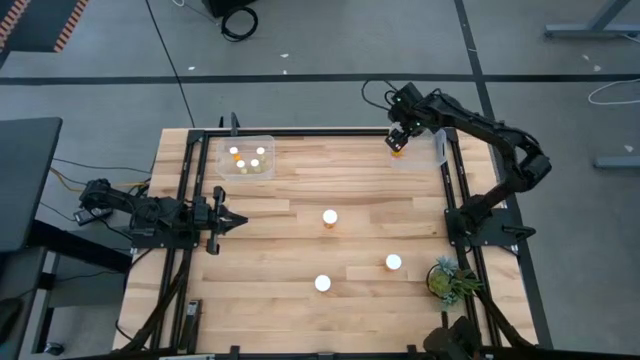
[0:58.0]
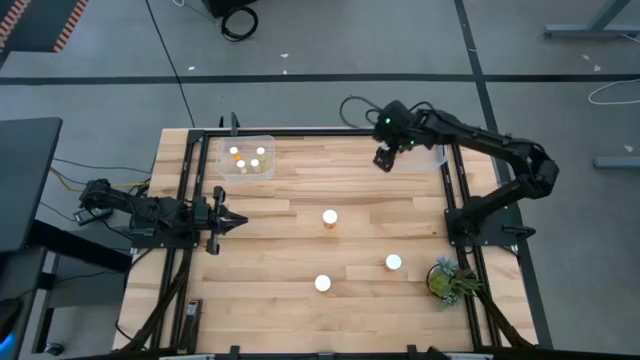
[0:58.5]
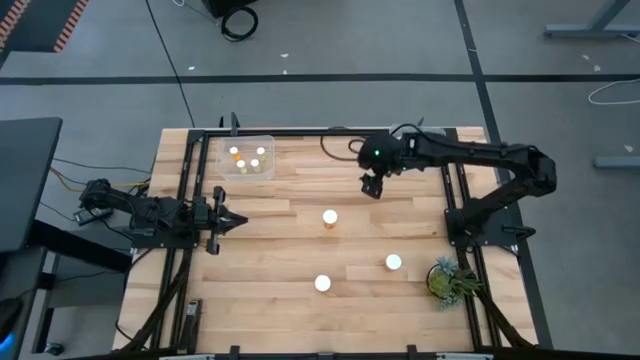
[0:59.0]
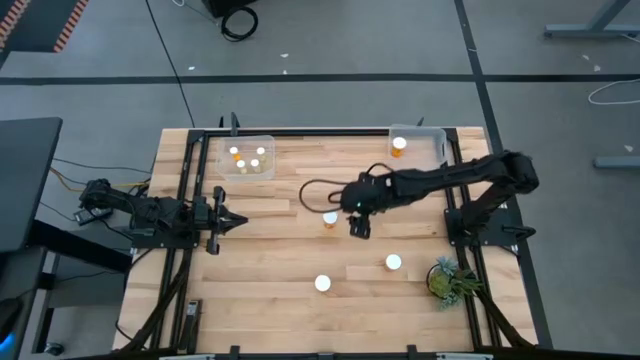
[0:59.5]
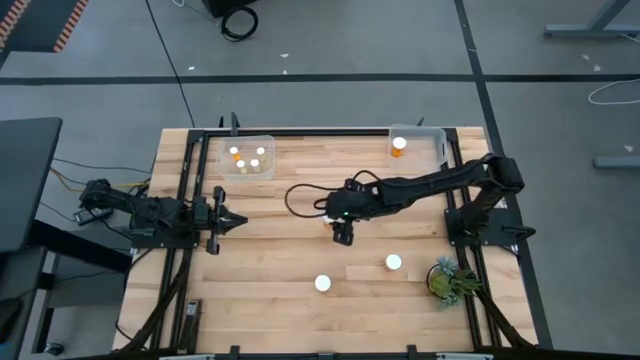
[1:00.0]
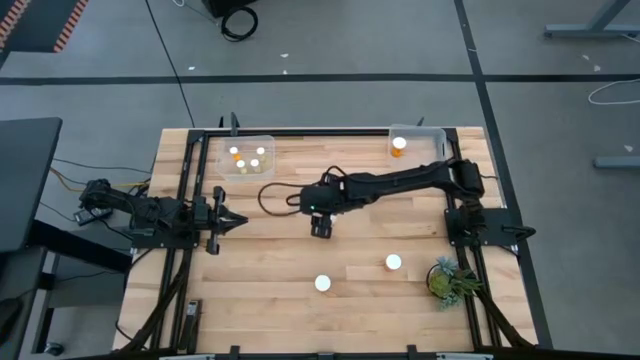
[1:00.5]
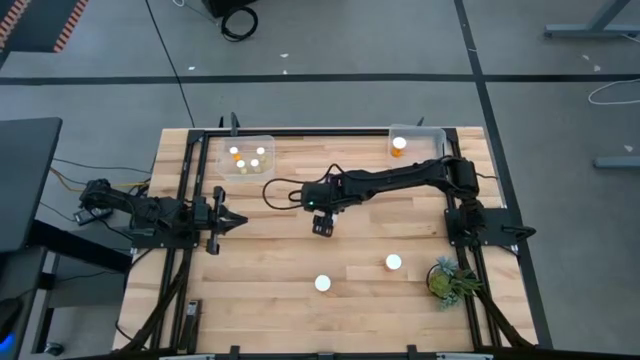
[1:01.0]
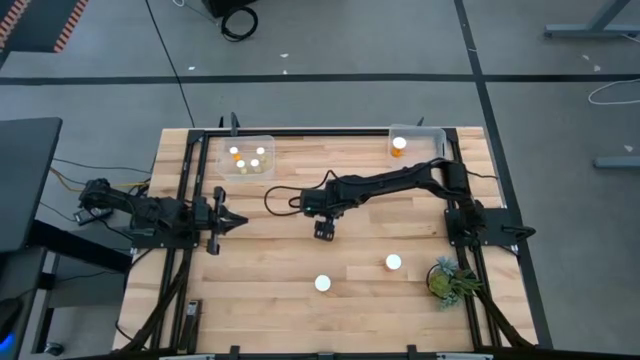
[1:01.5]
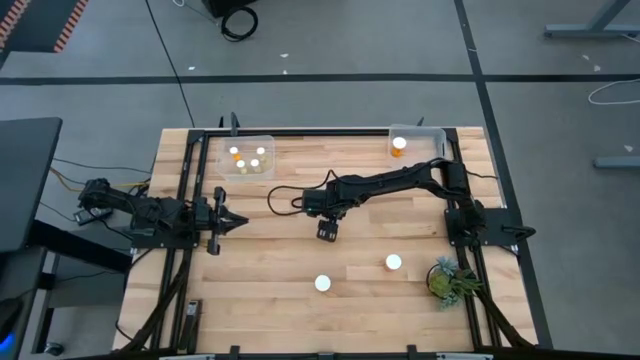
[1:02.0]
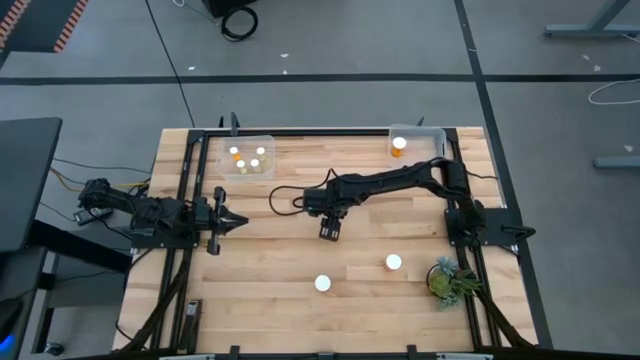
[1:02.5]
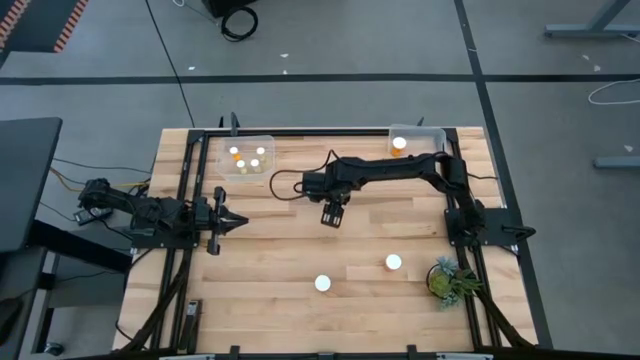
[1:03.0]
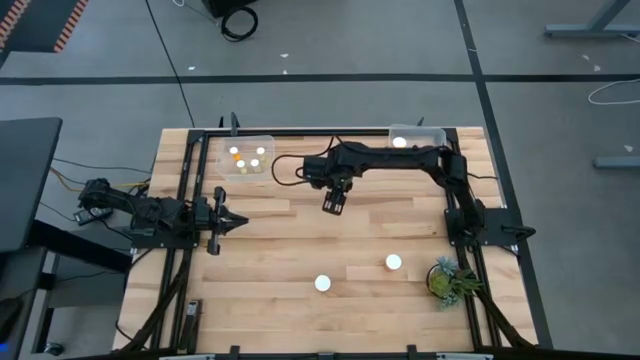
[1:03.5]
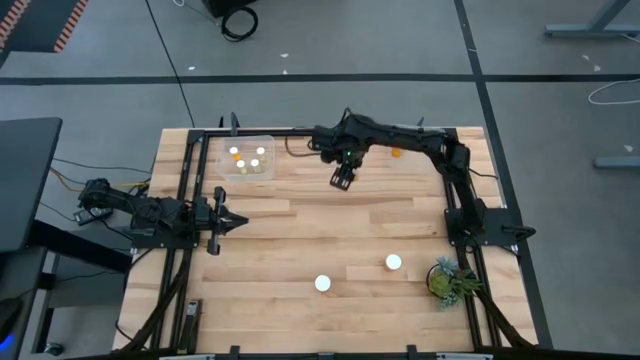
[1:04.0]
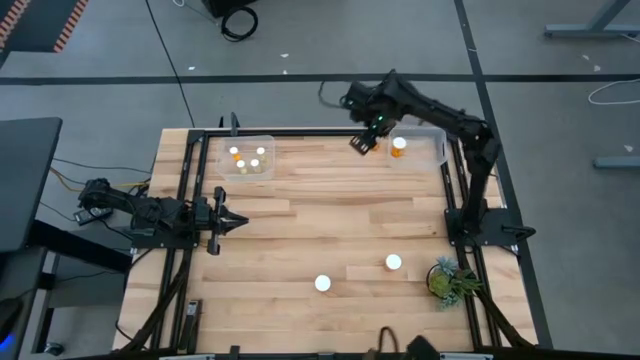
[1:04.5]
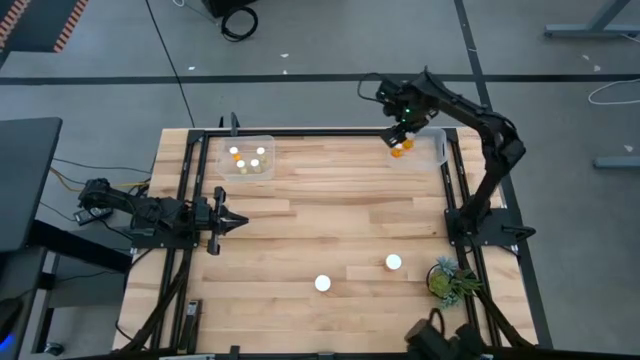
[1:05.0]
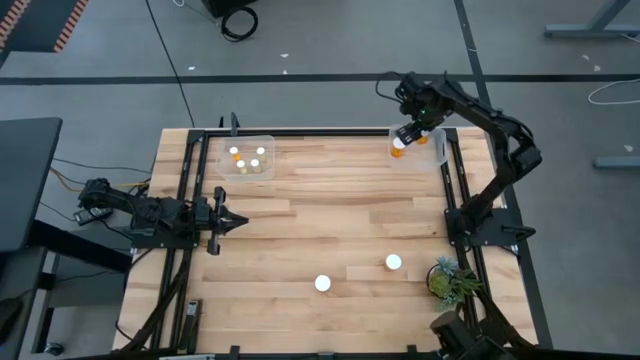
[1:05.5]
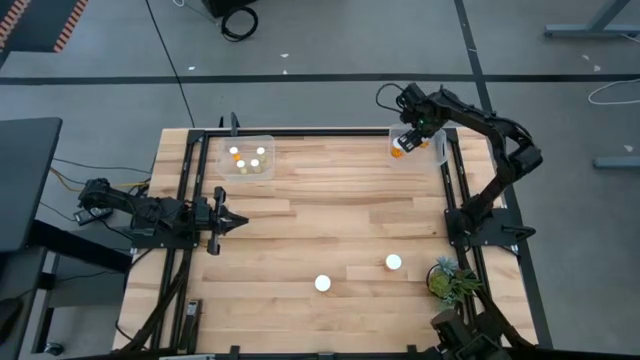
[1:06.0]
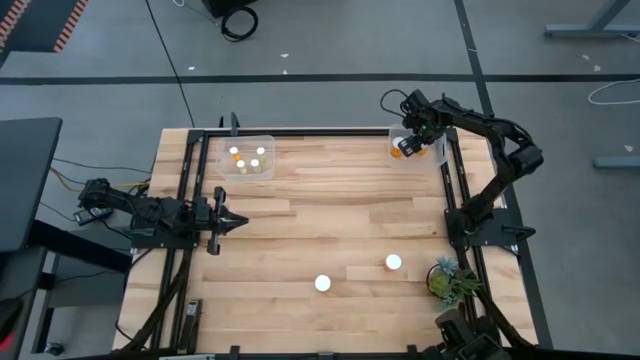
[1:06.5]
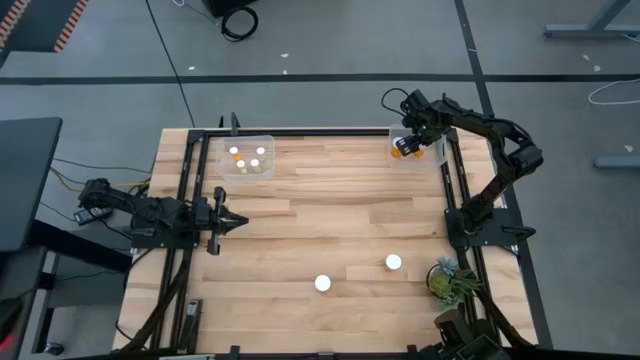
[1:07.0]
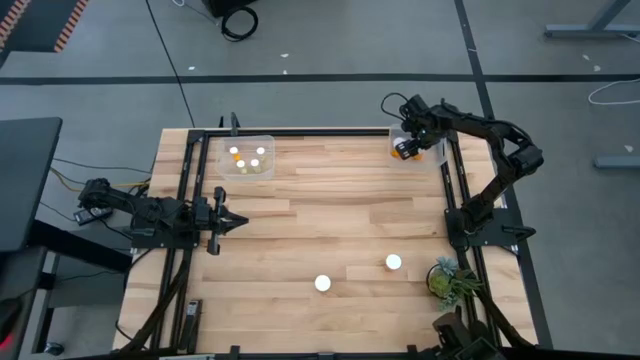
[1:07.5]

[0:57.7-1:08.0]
Task: Pick and place medicine bottles into bin by pill shape (circle, oval)
Put the top orange capsule bottle into the right transparent bin

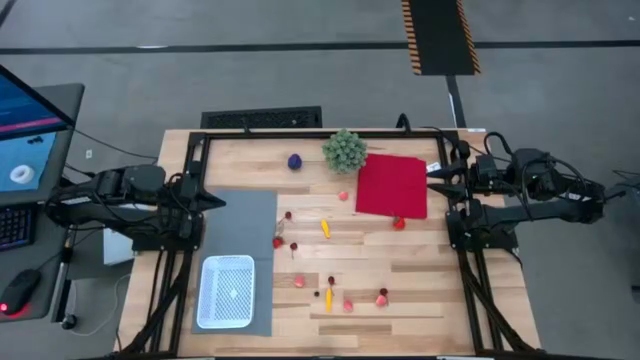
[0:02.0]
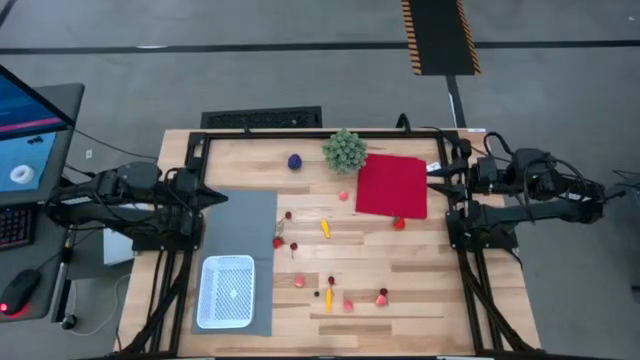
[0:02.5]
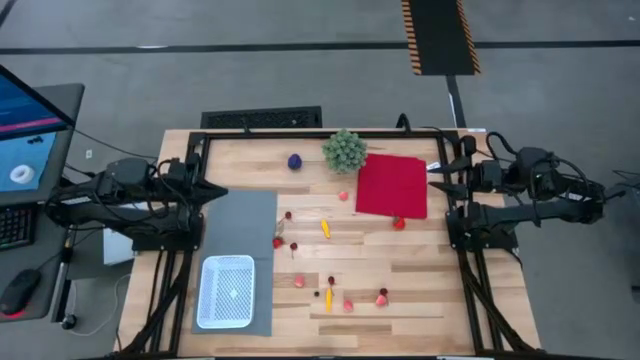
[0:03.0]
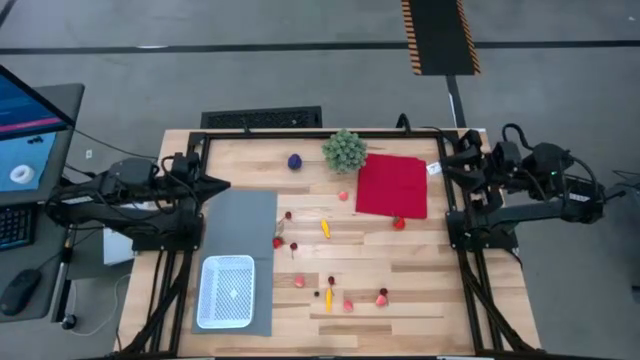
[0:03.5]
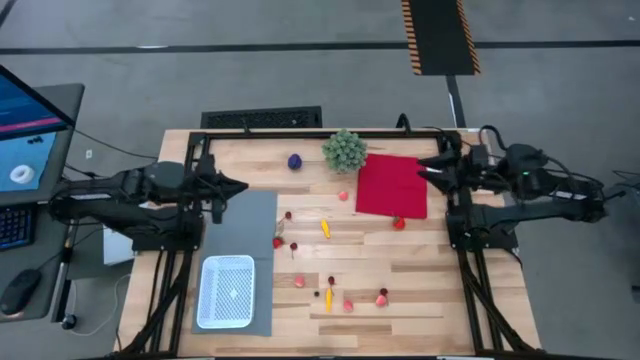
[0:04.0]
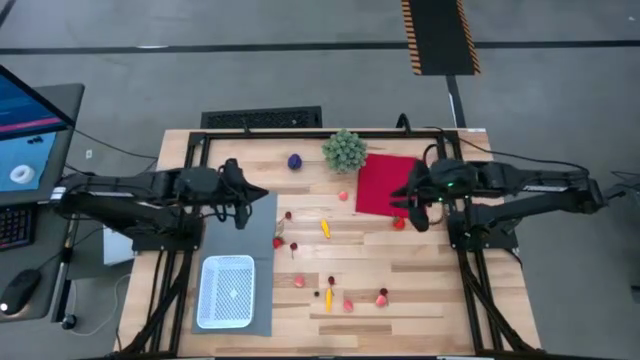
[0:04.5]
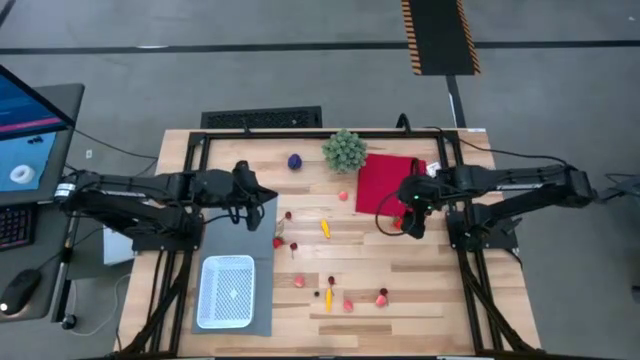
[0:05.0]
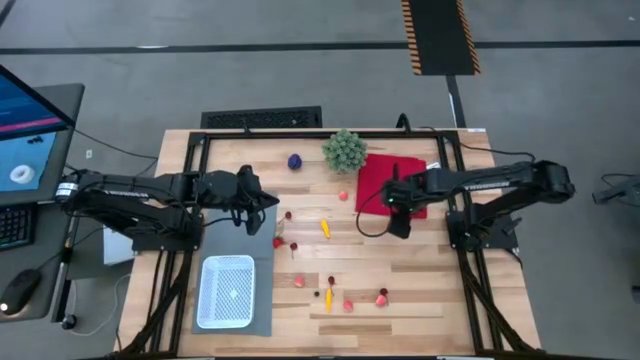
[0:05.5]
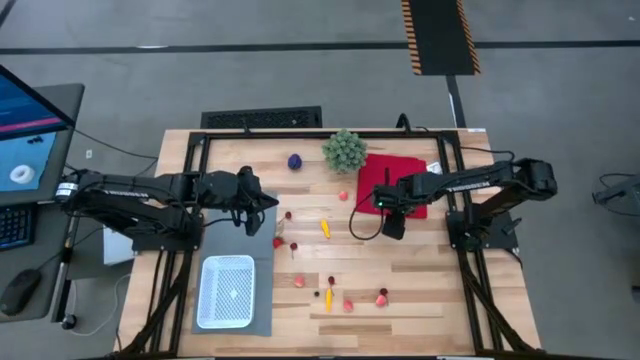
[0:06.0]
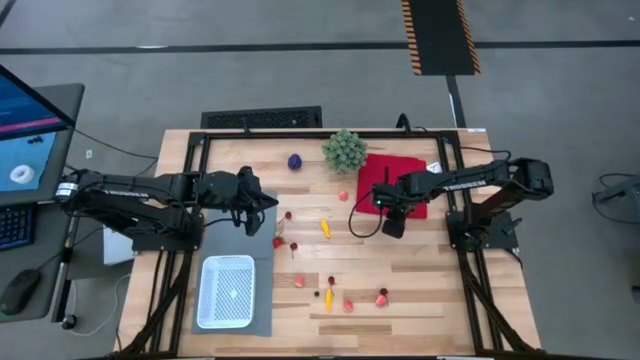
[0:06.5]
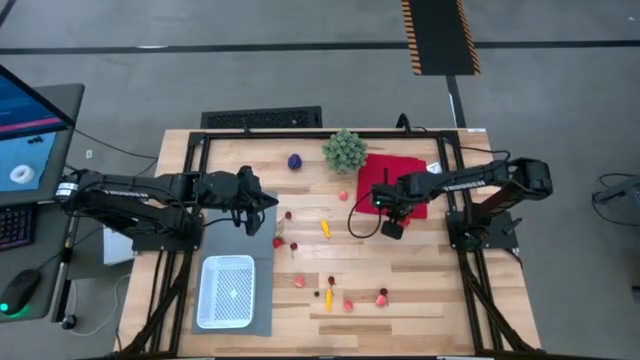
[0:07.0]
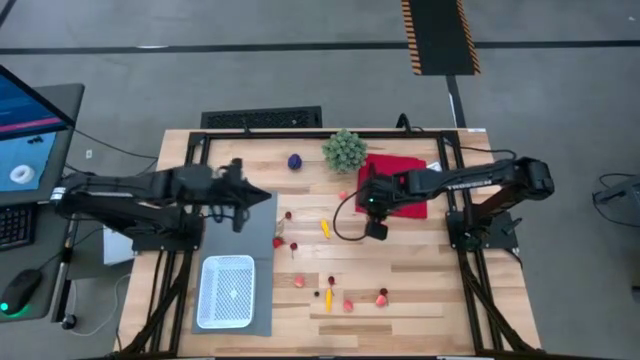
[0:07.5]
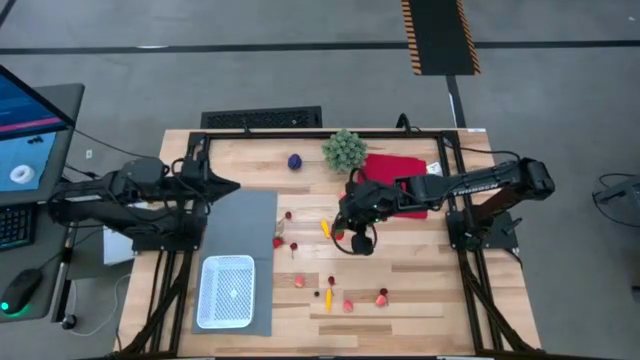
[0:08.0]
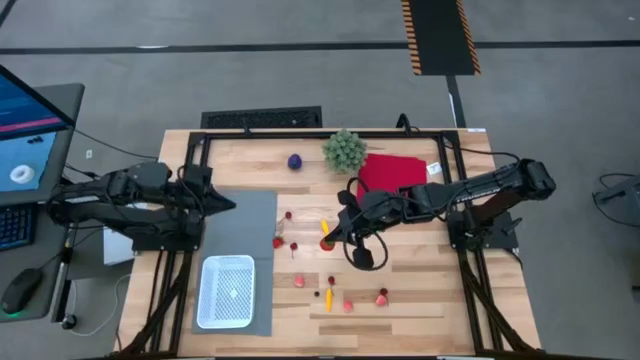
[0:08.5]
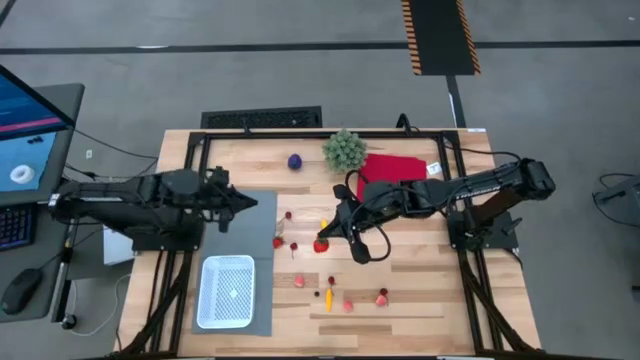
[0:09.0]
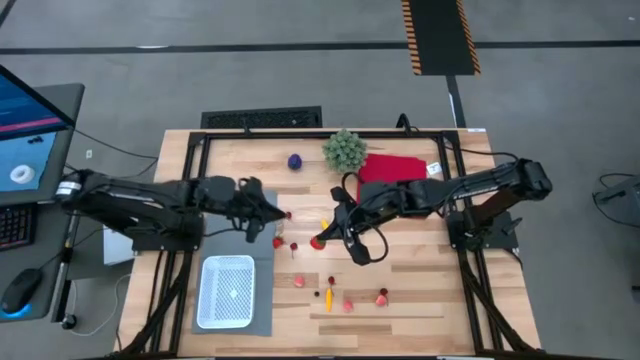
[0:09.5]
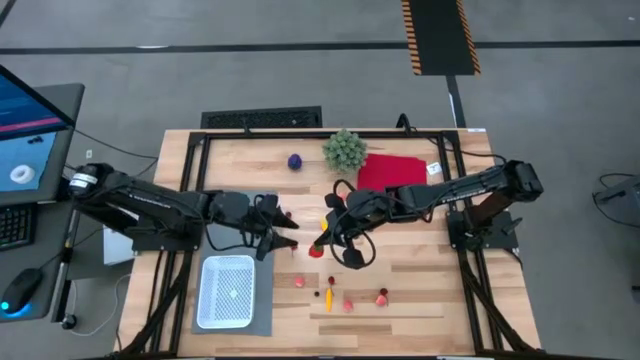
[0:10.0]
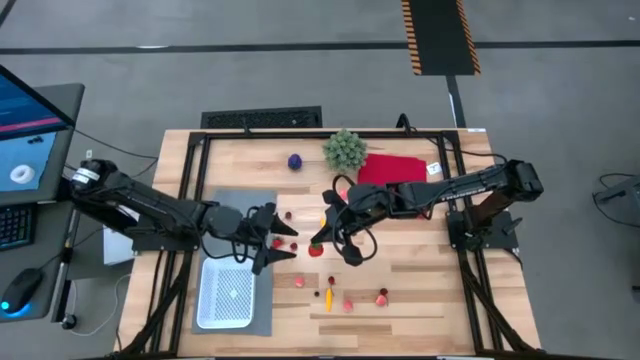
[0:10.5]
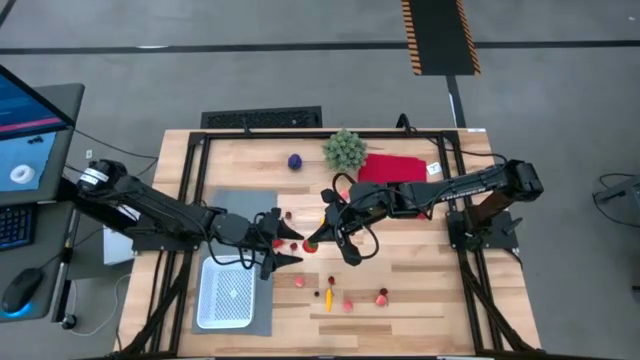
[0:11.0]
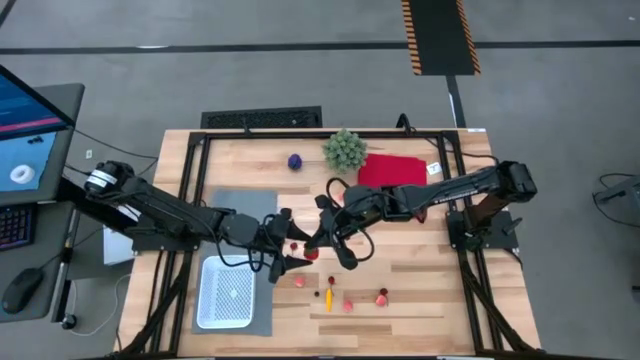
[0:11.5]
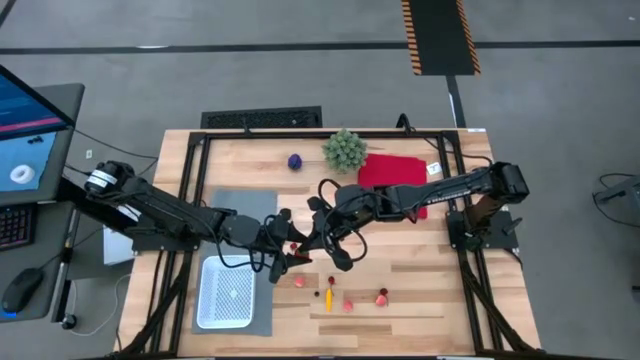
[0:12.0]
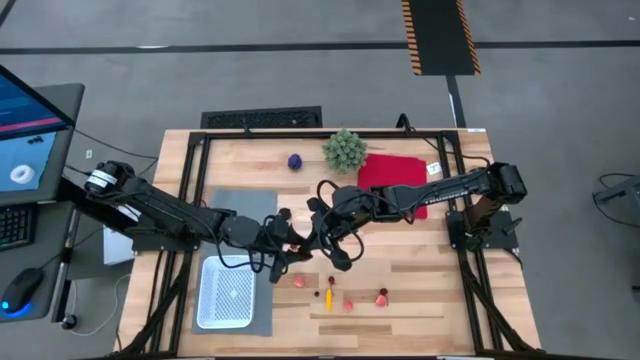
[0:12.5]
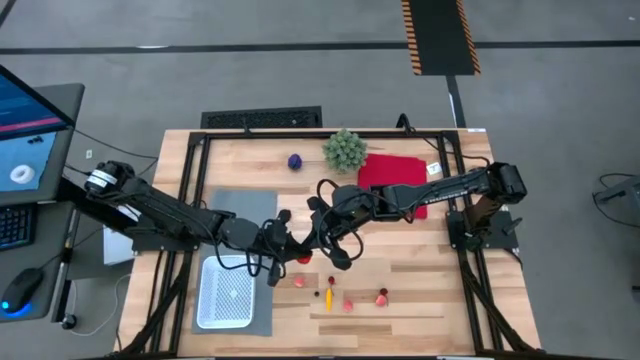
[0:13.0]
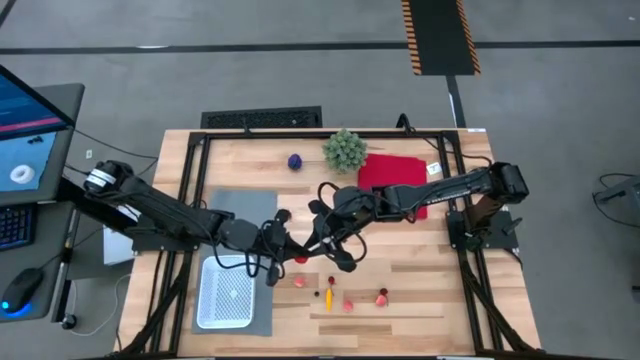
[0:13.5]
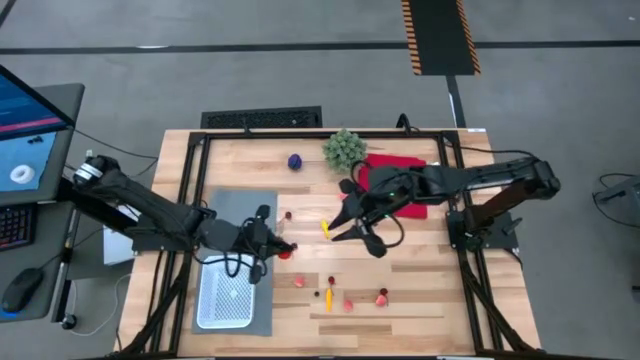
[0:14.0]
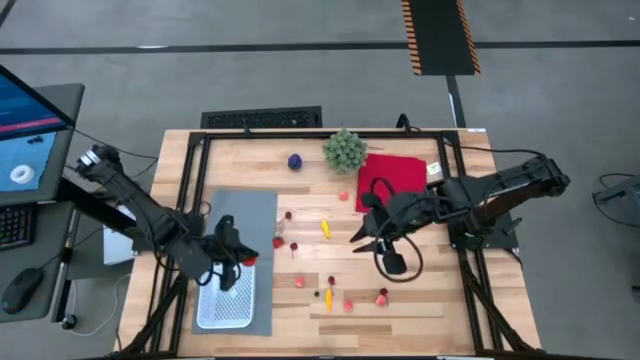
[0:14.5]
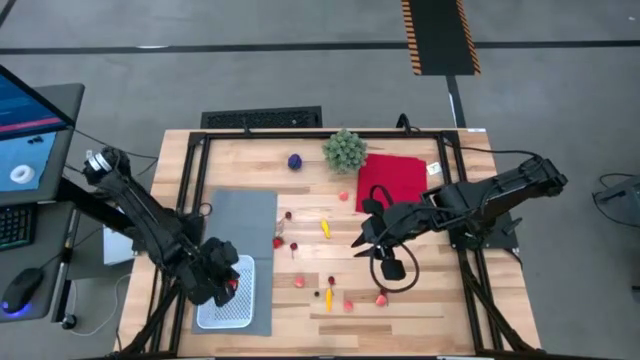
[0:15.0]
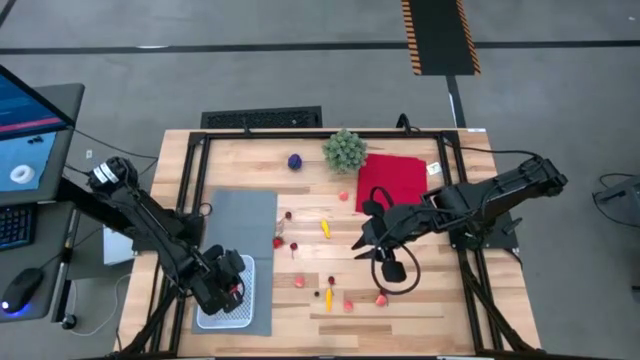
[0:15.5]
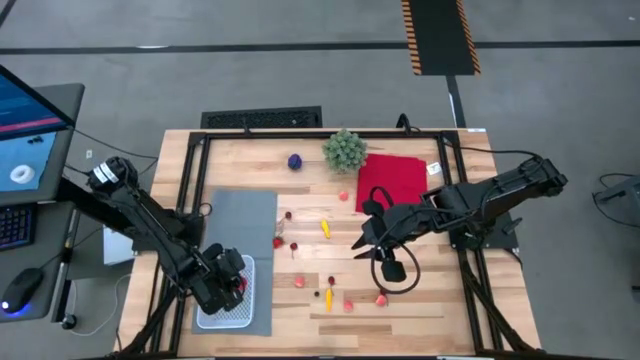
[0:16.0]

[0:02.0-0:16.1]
Task: Pick and placing Produce into tupperware
Put the red strawberry into the white basket
